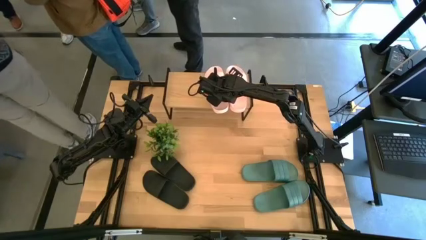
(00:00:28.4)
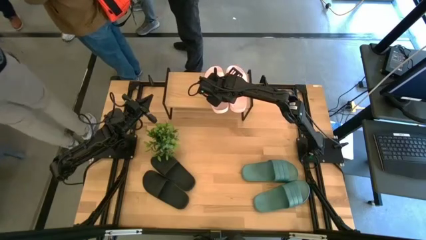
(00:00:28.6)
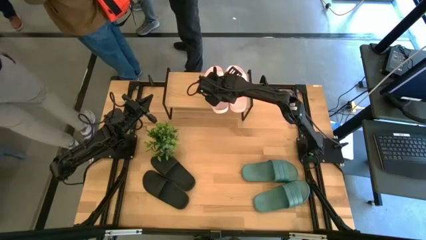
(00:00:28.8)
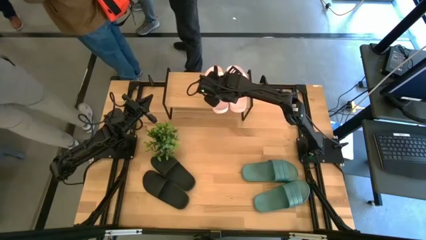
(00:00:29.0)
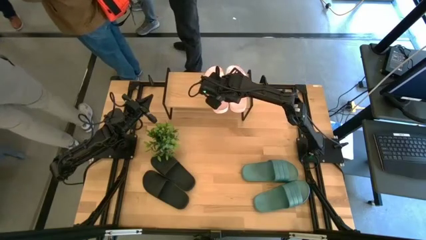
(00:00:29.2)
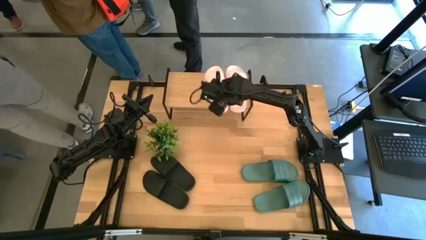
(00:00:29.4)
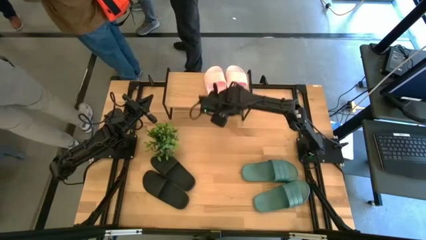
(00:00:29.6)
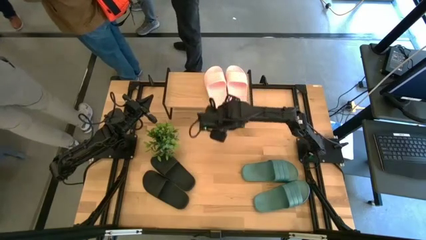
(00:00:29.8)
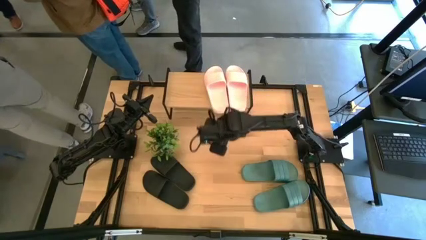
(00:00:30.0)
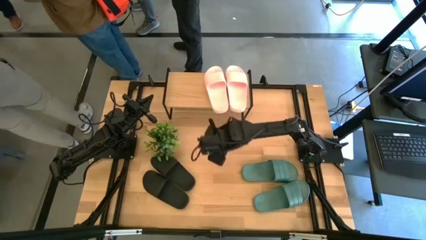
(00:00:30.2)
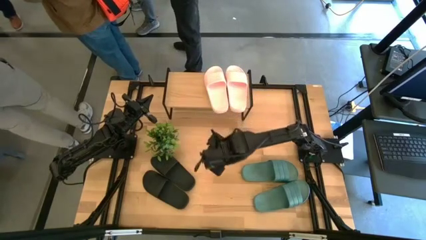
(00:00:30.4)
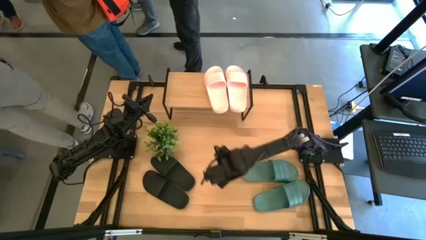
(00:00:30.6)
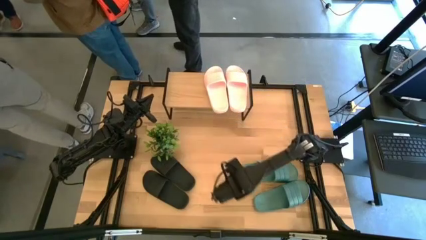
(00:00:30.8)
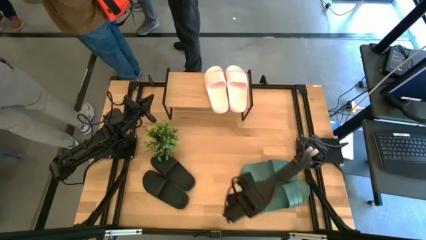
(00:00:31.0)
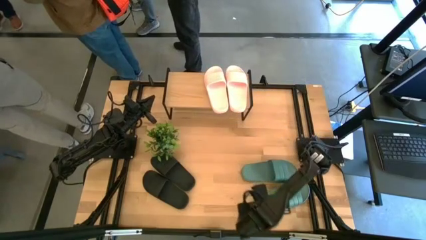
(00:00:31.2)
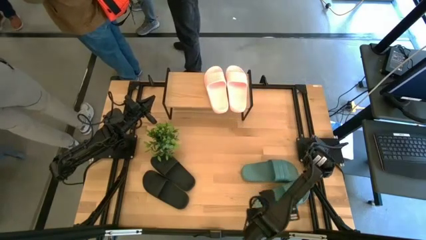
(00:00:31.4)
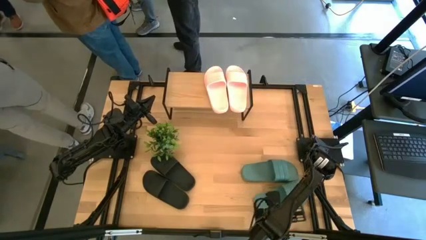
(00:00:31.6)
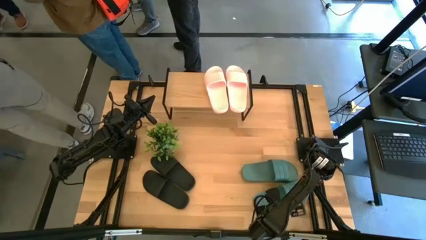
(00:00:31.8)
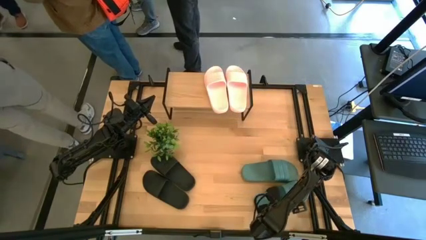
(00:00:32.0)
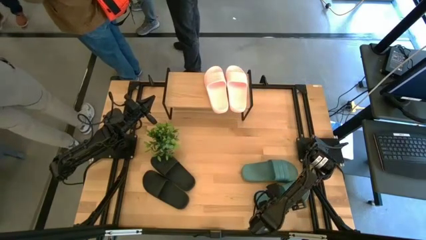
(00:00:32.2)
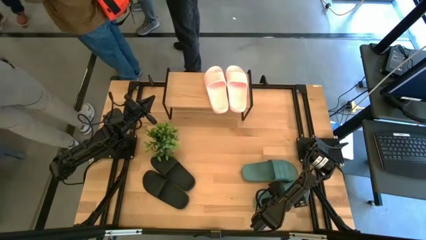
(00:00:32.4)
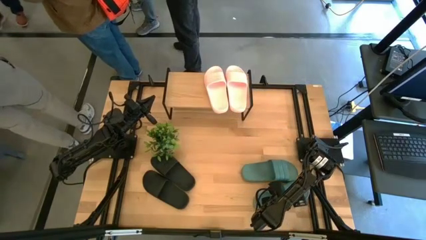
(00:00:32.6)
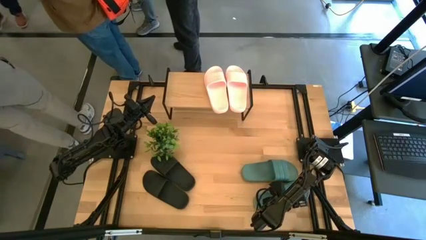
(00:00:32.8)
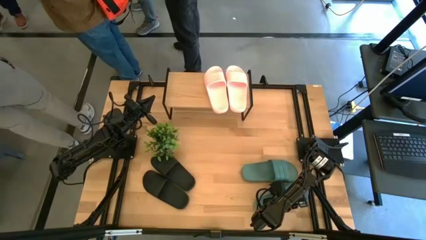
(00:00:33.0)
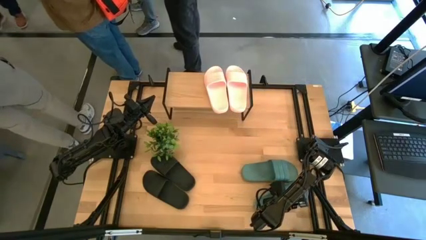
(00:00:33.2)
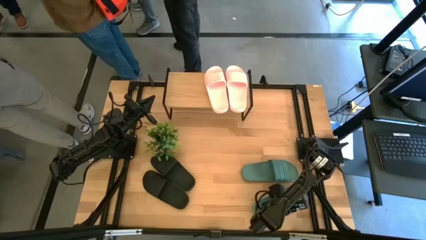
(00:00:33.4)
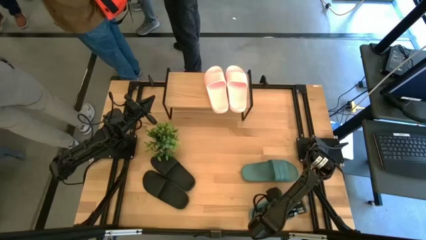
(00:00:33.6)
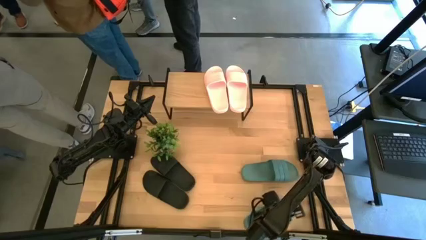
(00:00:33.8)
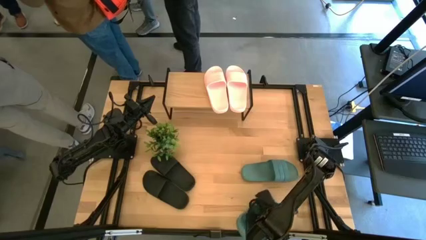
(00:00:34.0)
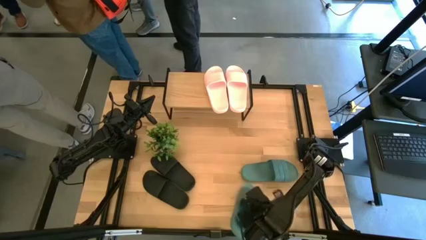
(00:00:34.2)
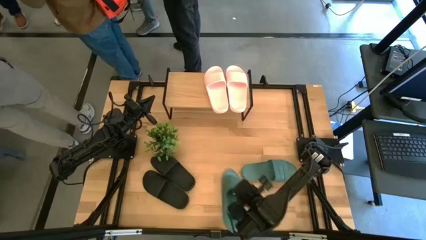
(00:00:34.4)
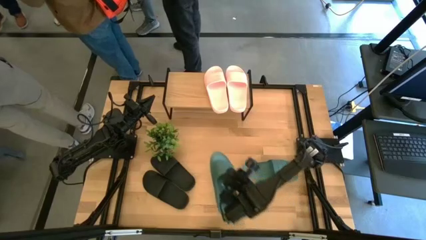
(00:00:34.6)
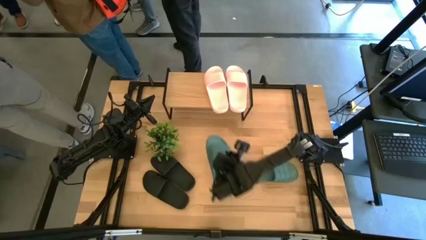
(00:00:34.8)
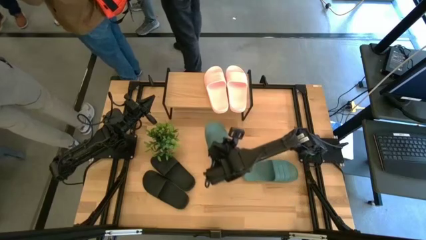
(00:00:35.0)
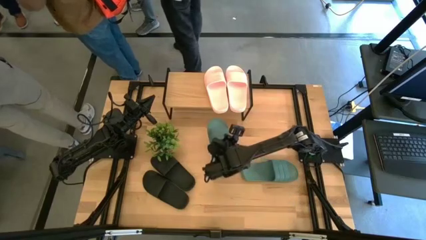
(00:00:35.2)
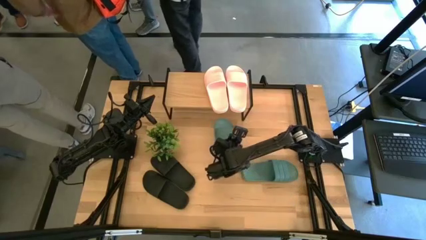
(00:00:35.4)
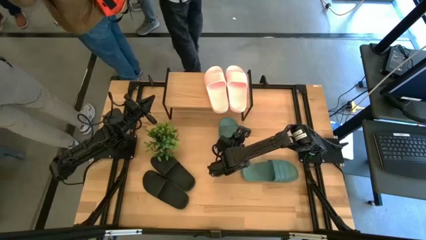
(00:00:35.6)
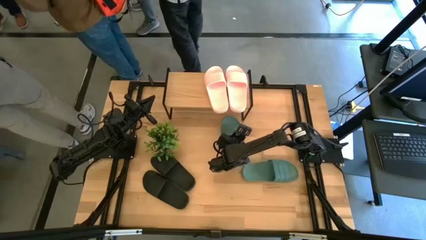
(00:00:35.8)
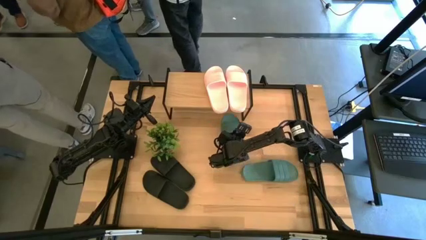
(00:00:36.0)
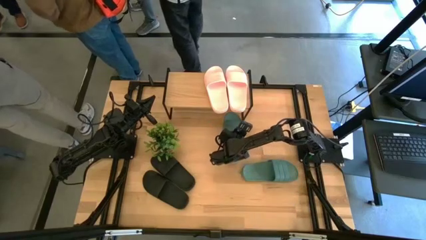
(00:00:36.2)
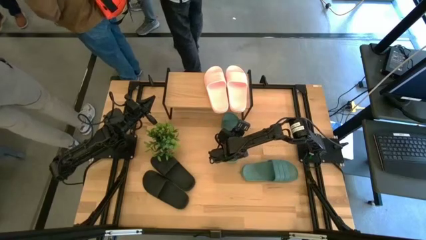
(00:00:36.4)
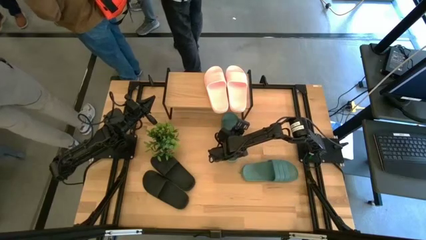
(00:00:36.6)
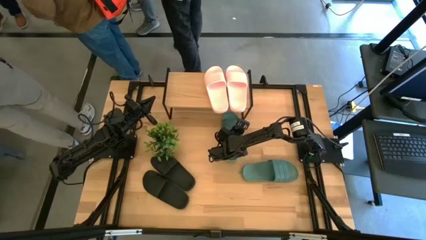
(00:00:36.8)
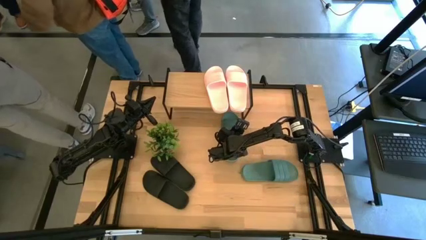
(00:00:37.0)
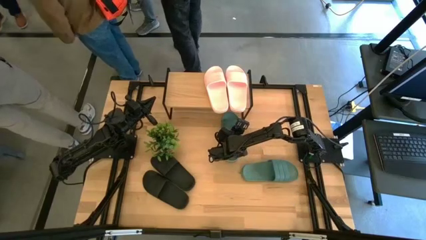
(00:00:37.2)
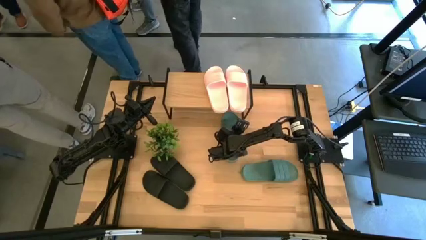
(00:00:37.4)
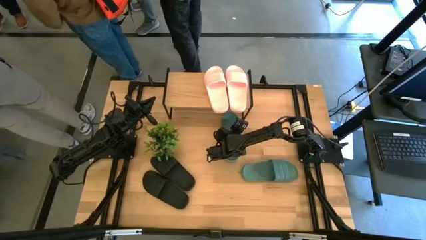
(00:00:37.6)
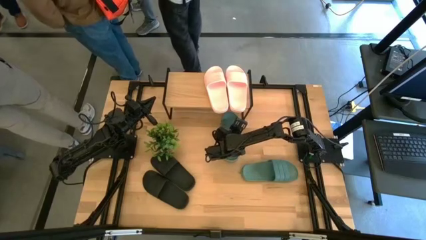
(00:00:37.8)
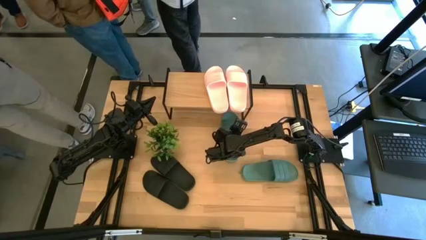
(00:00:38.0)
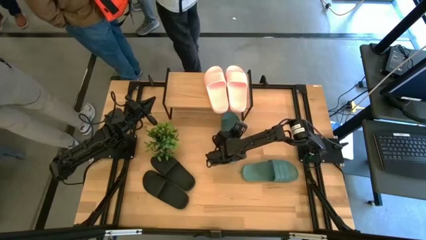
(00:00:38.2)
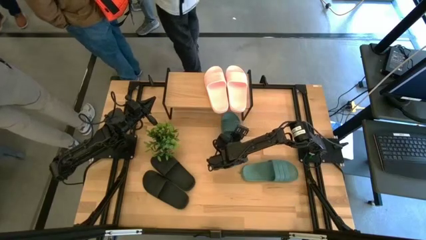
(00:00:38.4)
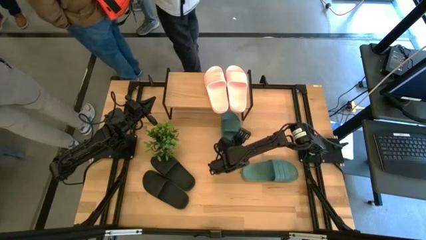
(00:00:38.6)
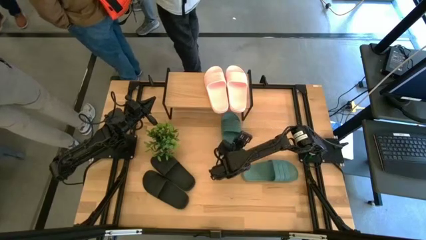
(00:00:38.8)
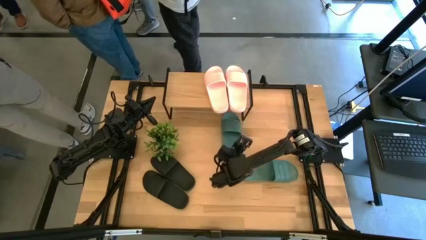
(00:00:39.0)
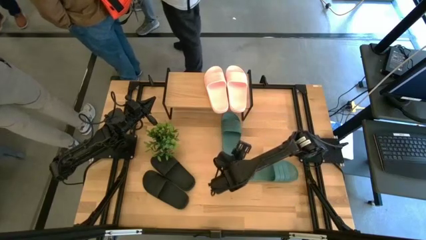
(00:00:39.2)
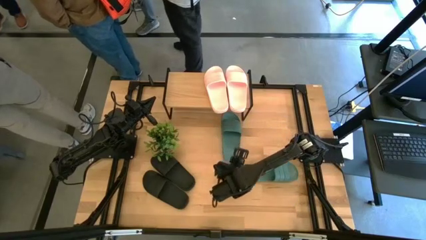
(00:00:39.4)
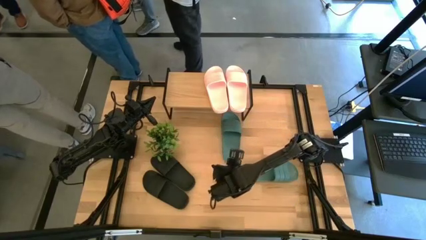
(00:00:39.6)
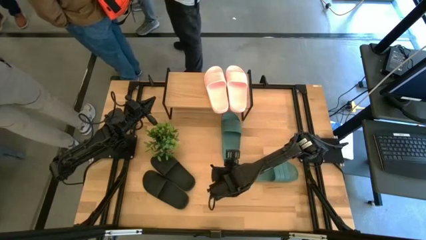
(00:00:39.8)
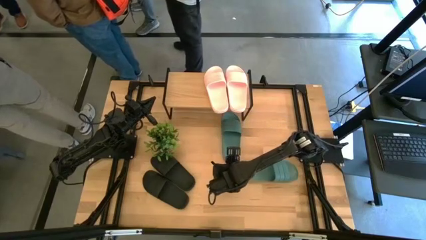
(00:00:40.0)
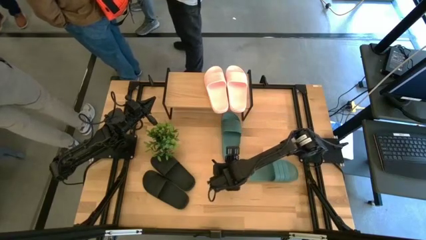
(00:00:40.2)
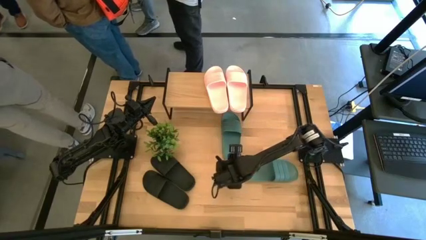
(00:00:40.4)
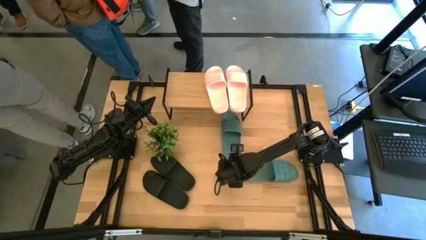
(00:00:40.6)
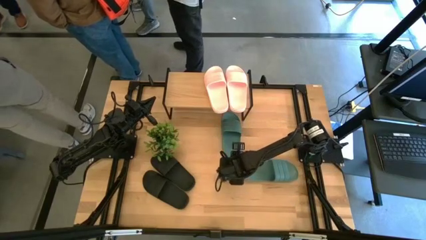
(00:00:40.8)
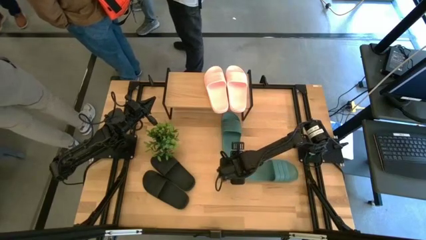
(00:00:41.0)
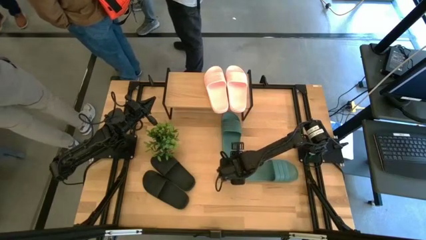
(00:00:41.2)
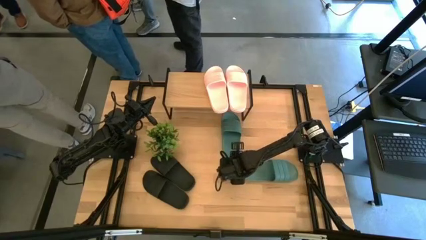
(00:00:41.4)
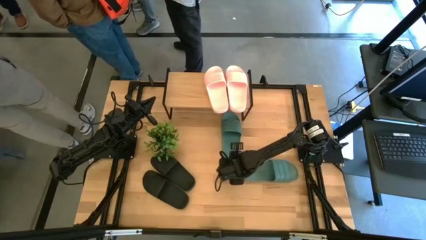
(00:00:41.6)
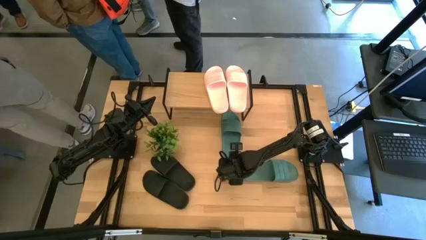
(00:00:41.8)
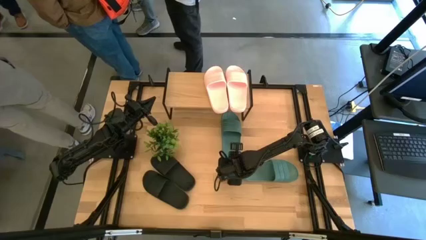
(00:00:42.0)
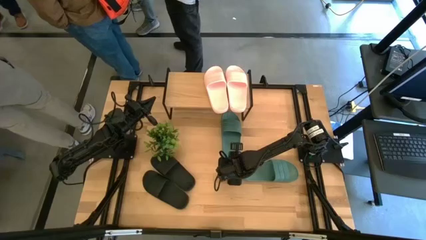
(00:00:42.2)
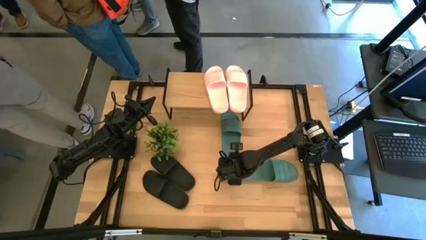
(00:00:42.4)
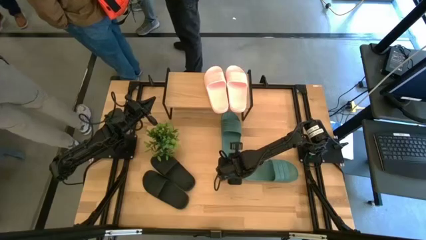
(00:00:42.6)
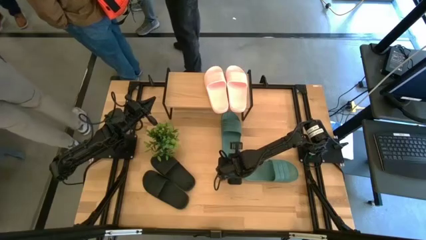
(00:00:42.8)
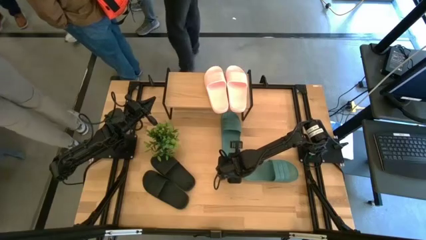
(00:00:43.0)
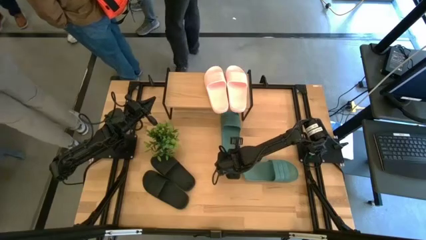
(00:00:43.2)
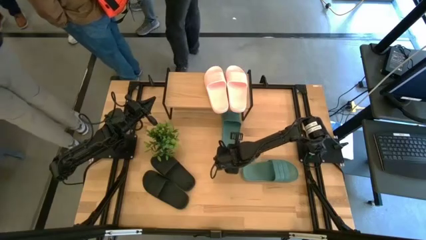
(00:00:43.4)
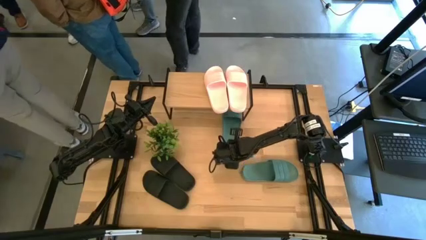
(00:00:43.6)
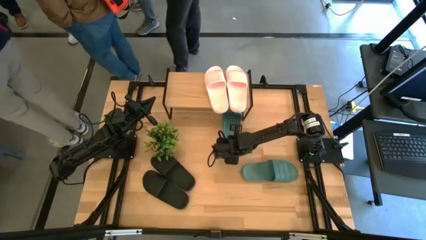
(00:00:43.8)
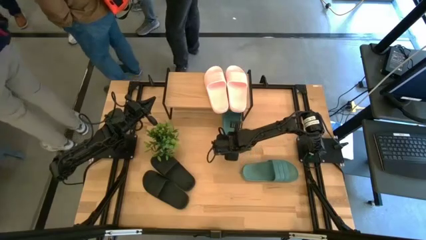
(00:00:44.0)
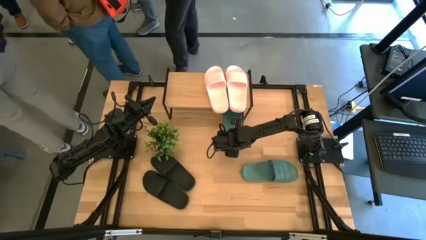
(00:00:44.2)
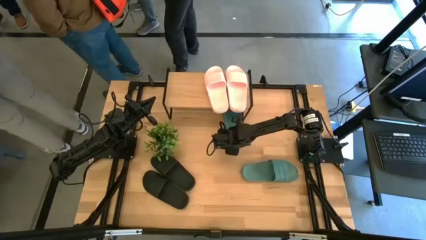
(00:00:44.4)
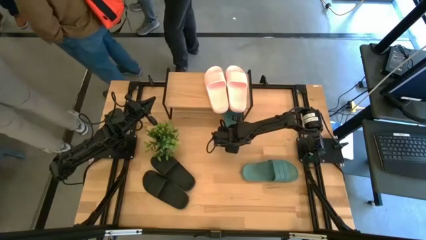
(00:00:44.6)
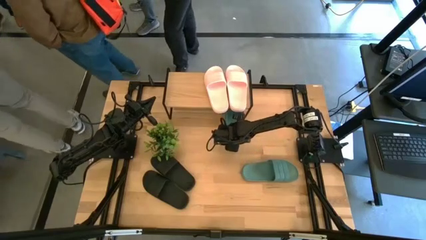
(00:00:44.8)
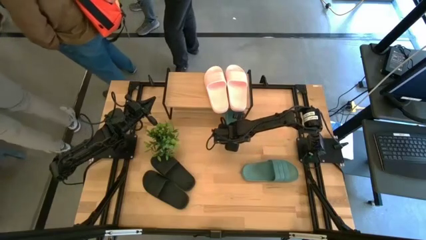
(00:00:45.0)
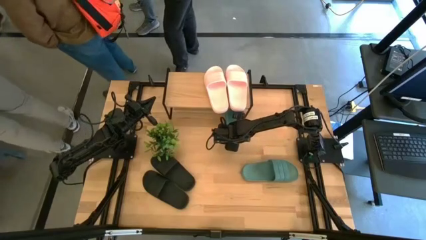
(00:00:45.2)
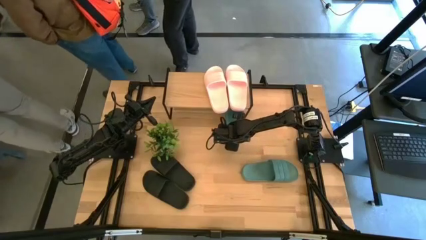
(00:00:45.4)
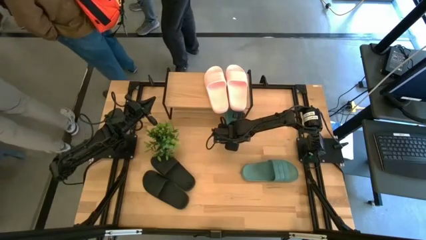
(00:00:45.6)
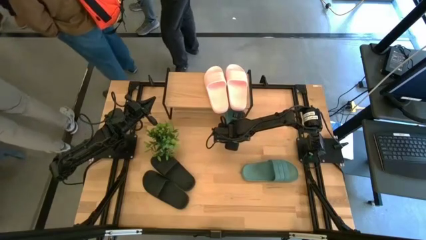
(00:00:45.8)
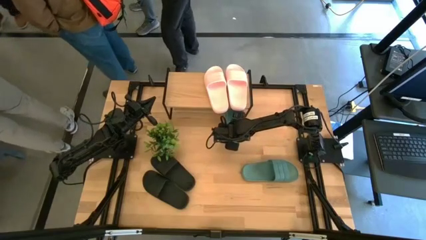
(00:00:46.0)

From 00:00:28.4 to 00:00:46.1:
Task: Pick and place slides into the shelf
Put the bottom green slide under the shelf
